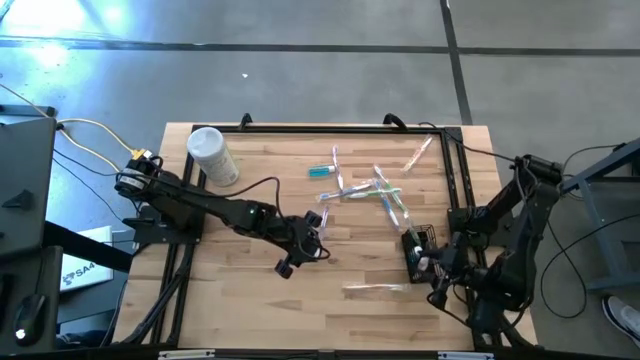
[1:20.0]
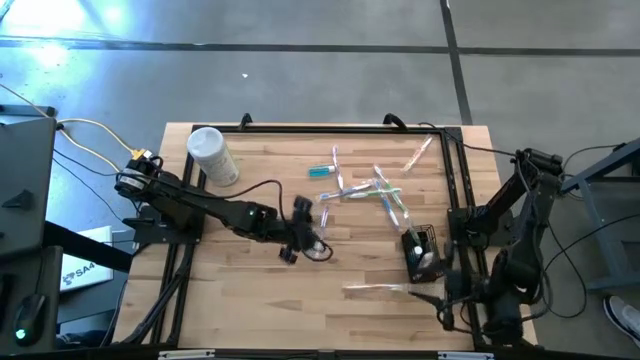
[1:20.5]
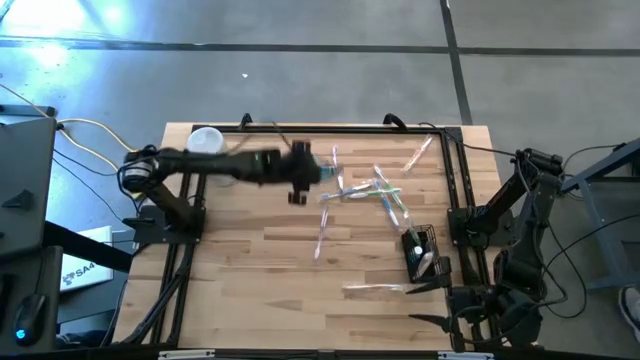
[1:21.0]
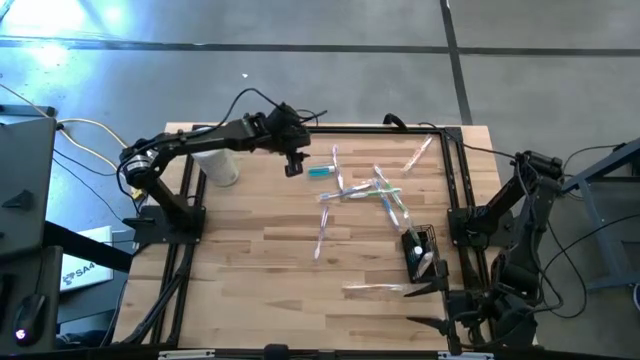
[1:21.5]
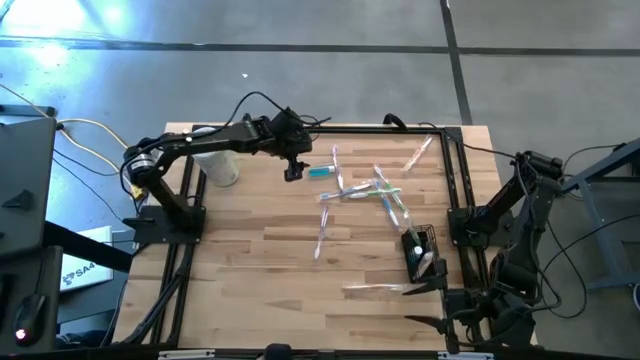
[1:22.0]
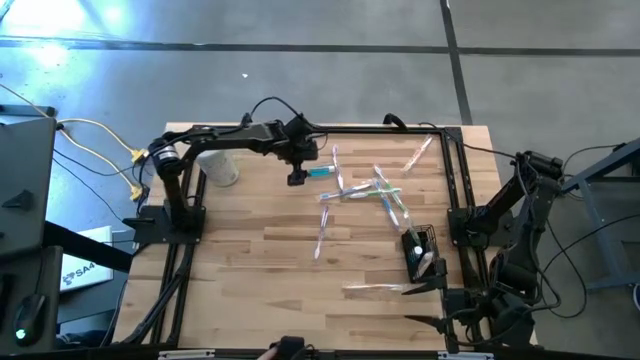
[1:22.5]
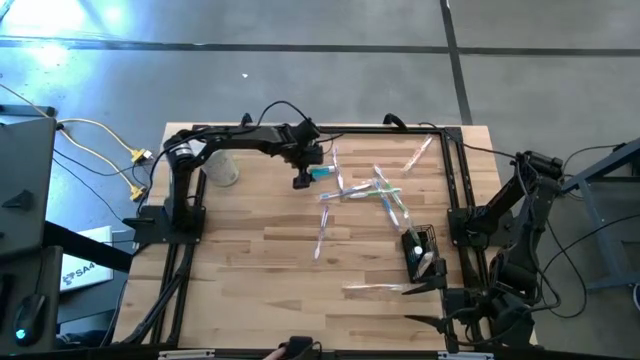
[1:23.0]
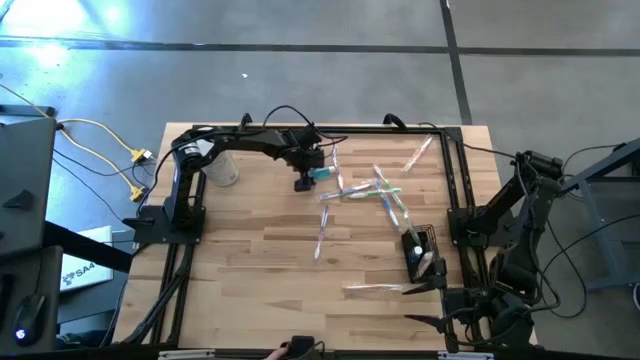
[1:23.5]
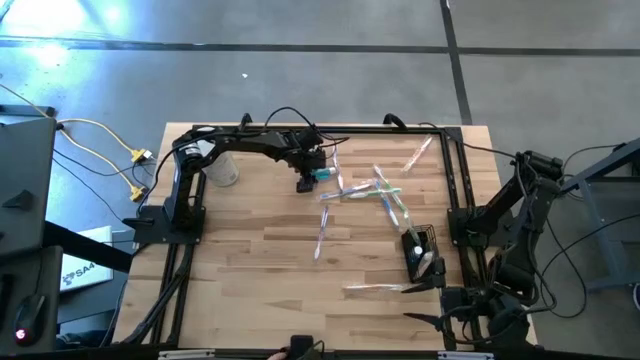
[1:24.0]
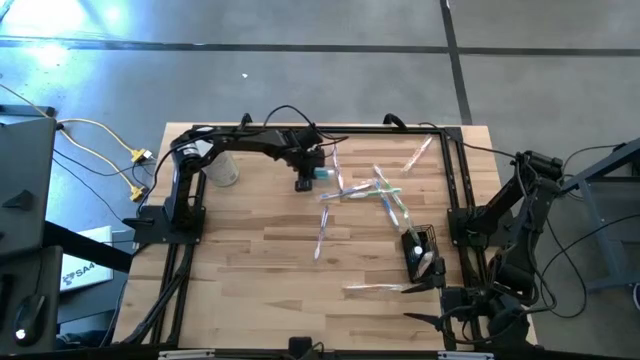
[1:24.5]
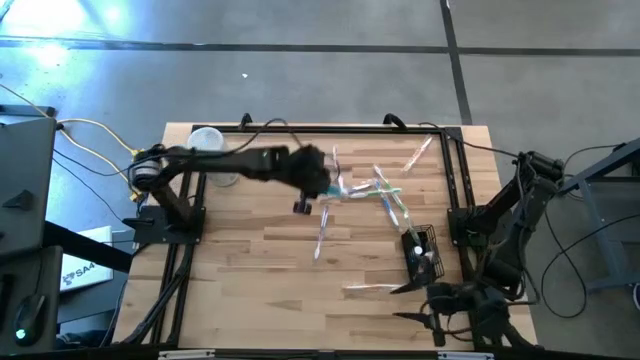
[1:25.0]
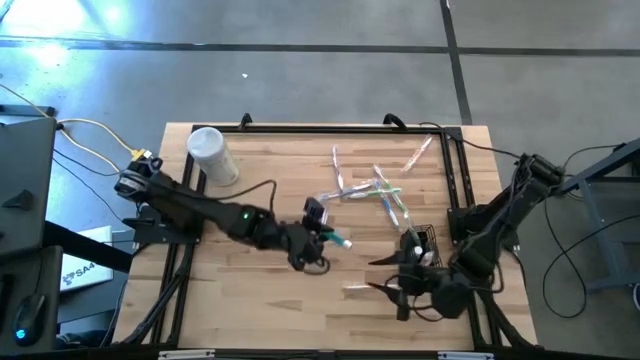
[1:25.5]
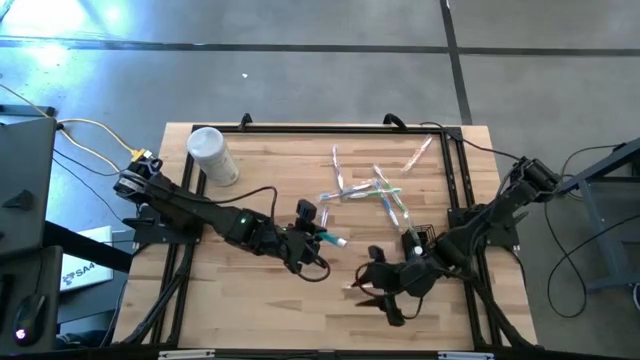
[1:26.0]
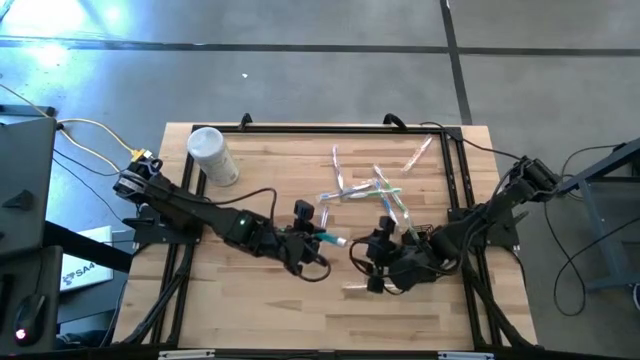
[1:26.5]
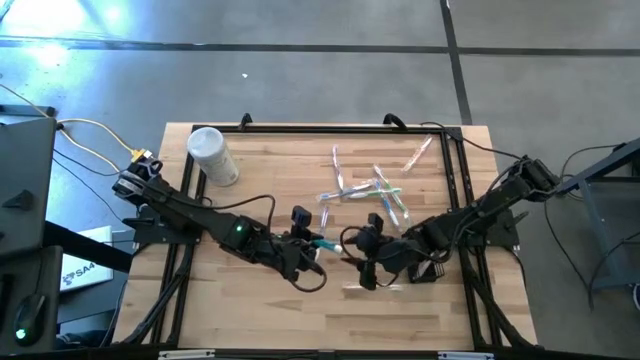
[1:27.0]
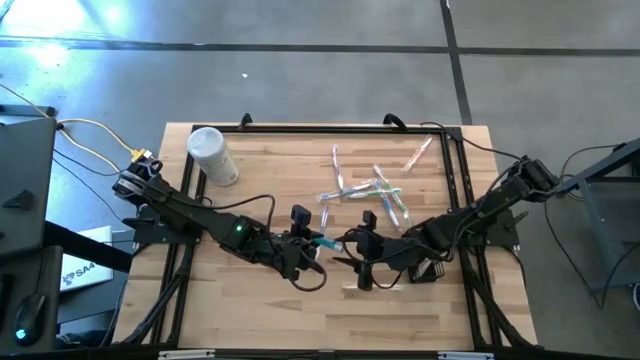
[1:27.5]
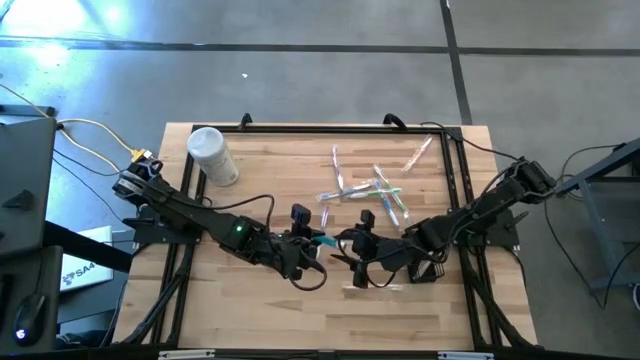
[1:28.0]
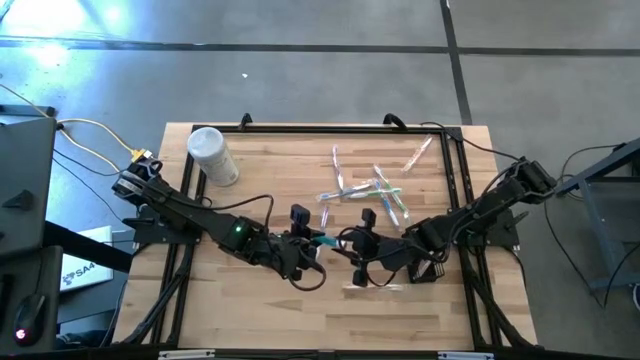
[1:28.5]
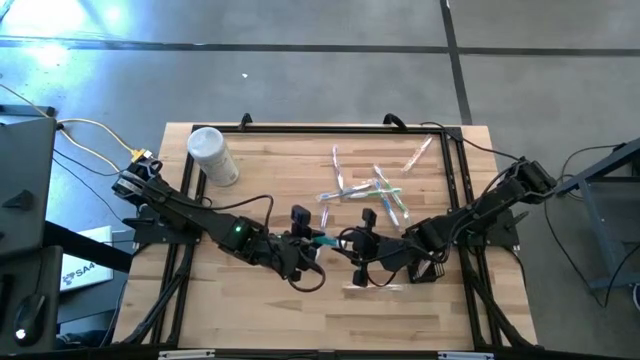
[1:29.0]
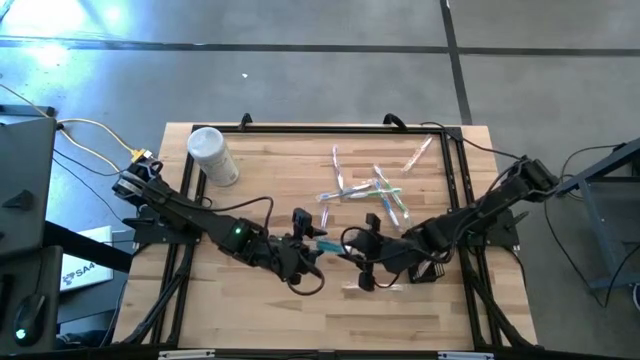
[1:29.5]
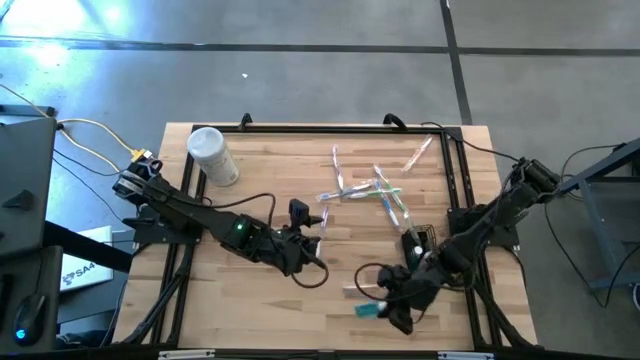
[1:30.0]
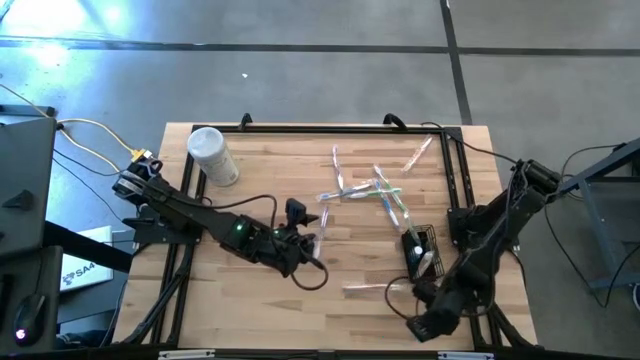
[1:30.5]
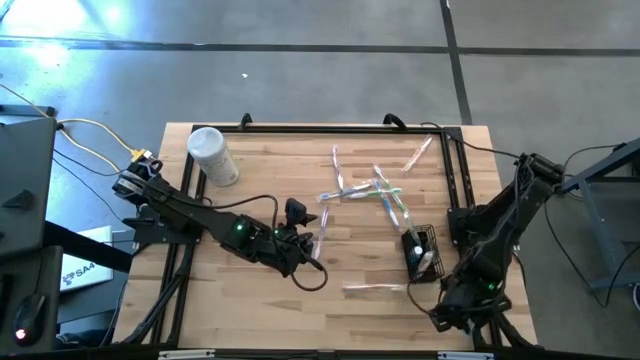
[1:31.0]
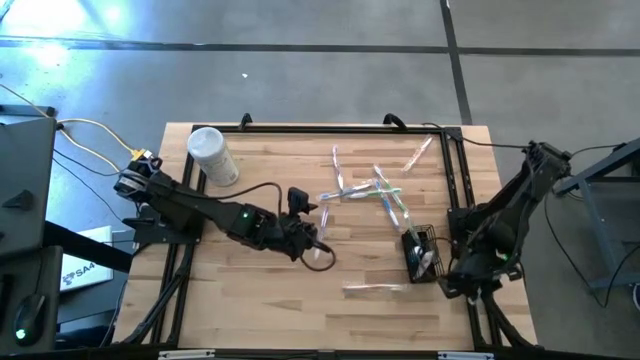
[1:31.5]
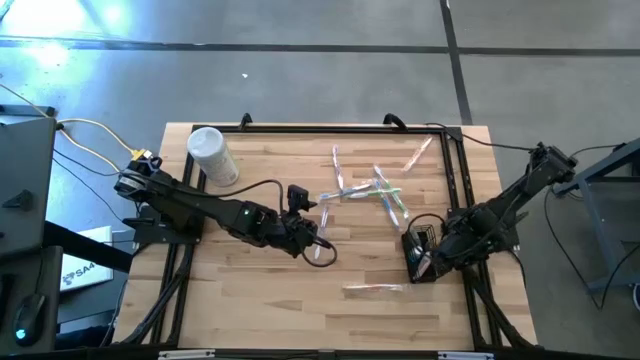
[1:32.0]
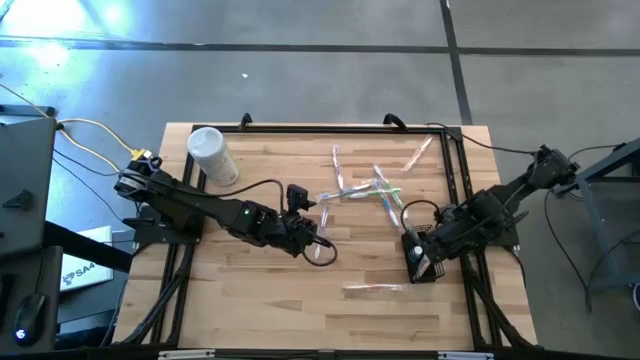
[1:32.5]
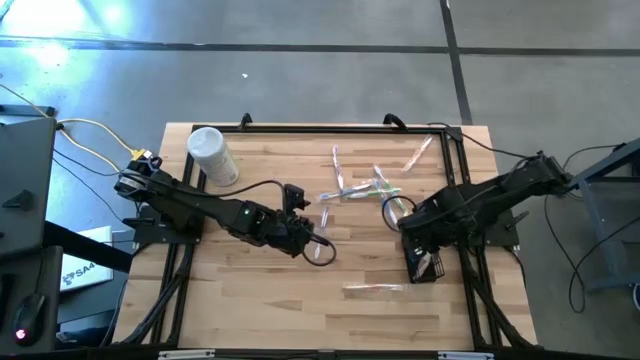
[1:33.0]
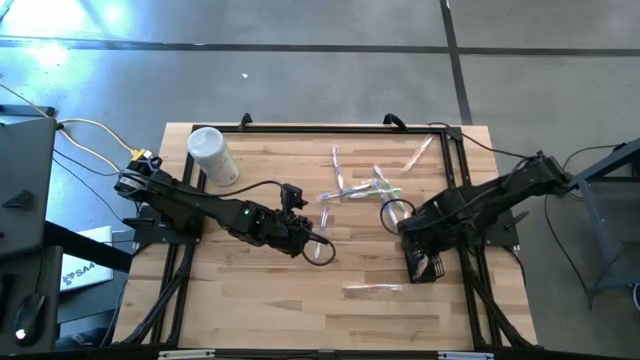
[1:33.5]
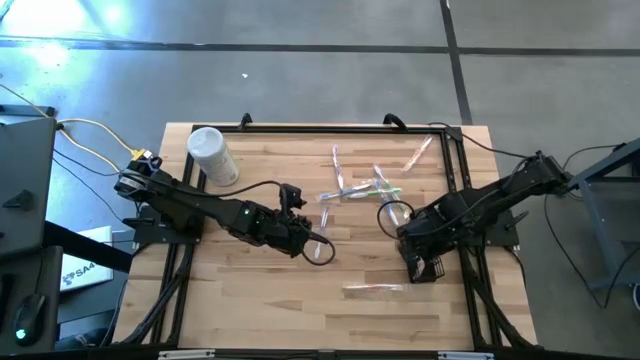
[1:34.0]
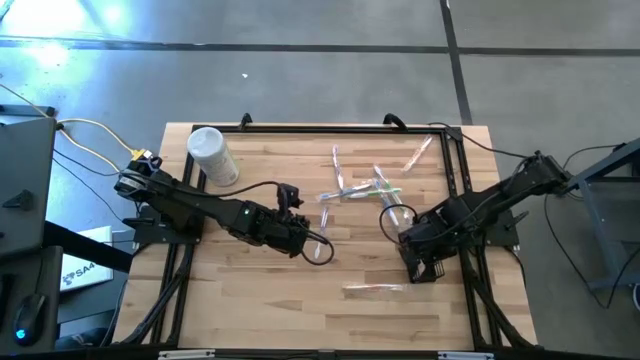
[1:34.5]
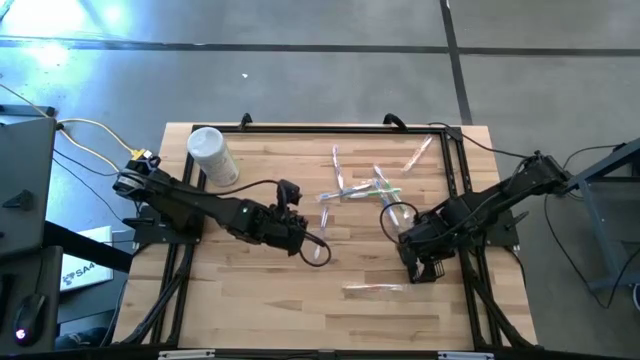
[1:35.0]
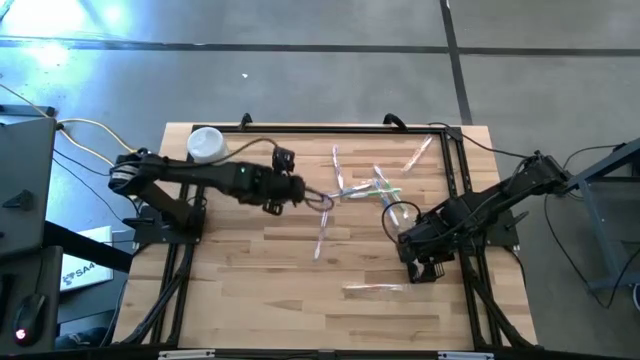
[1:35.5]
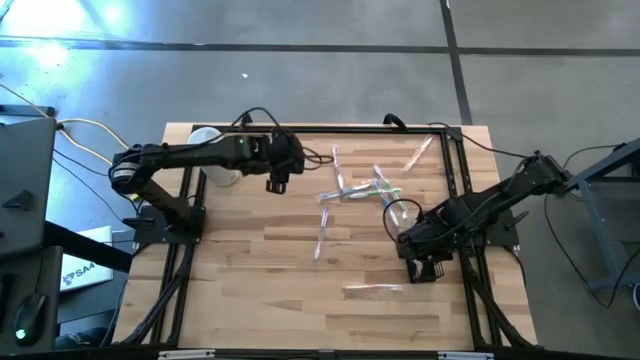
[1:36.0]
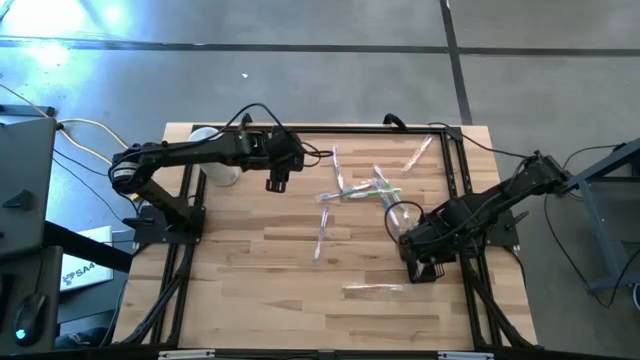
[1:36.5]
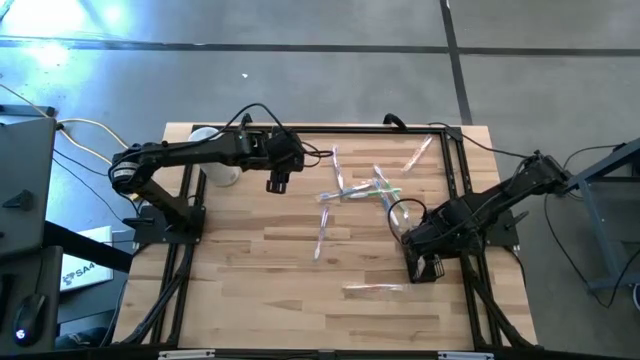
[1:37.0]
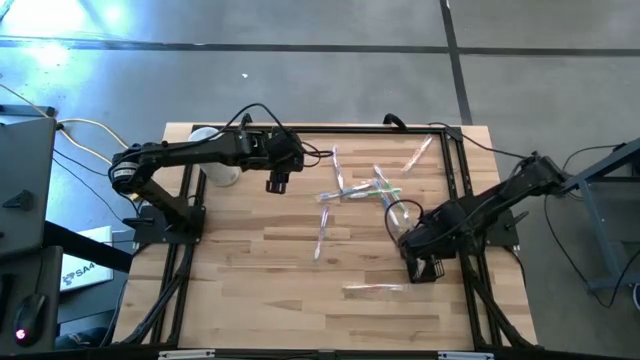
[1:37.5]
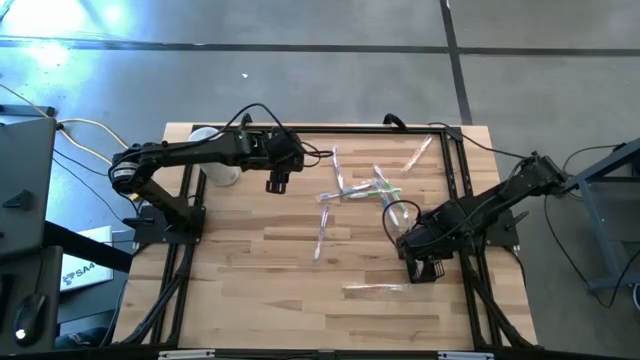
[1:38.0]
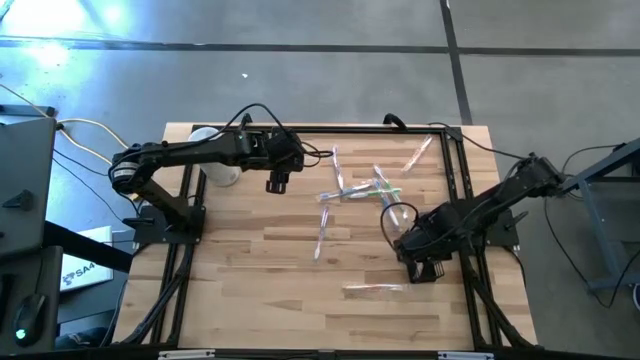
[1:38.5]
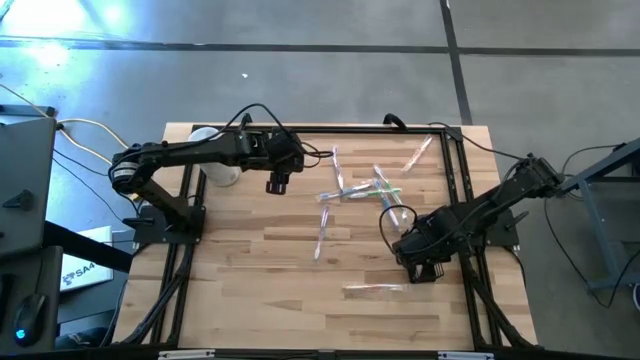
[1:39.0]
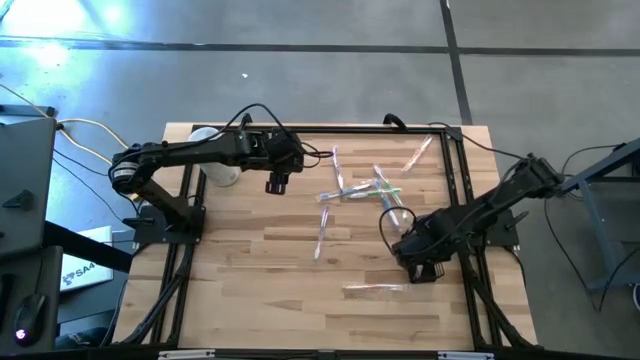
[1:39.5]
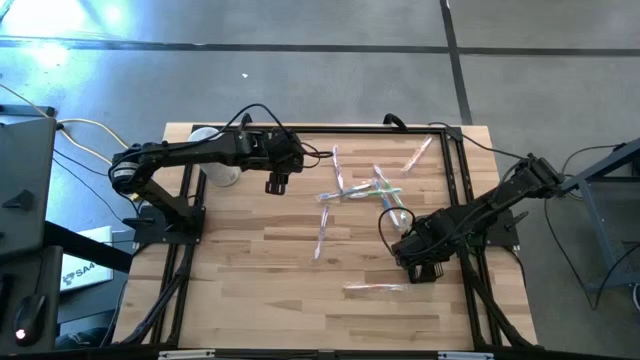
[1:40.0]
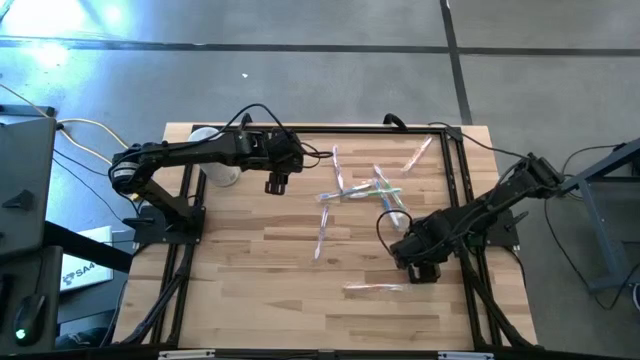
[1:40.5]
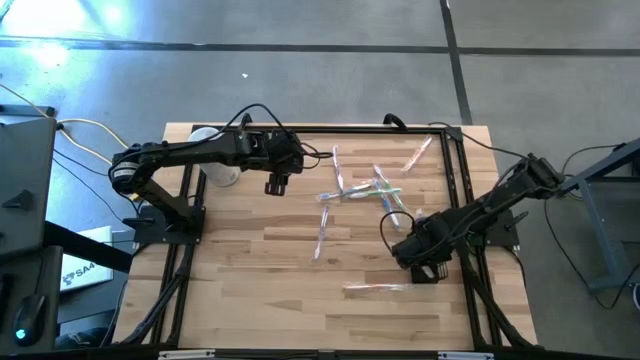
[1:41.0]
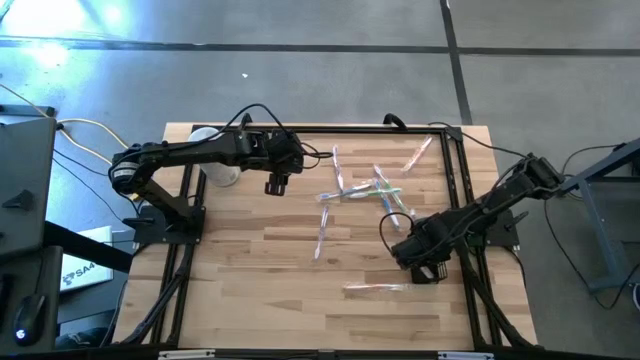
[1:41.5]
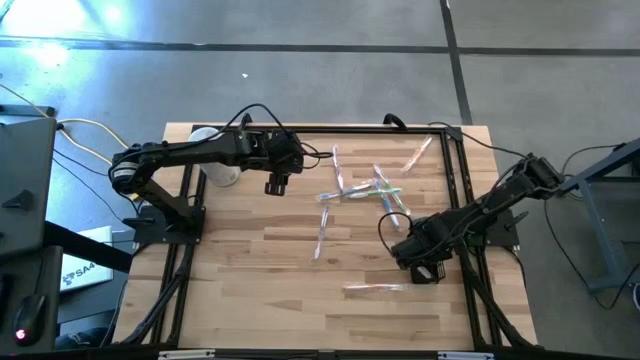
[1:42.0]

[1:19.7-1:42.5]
Task: Pick & Place toothbrushing station
Put the blue mouthwash bottle into the black mesh organizer
